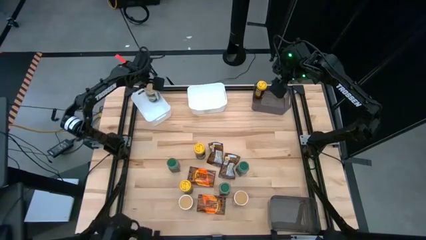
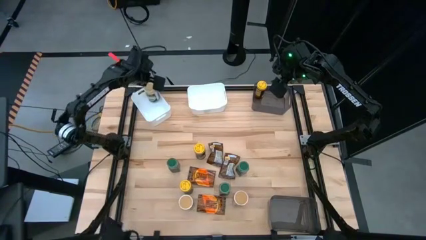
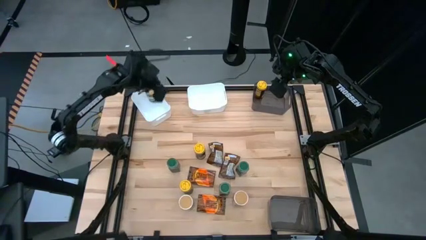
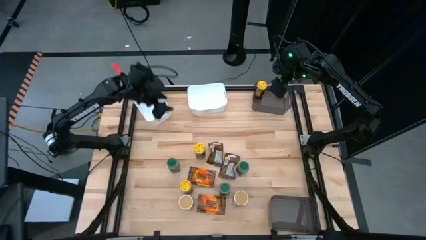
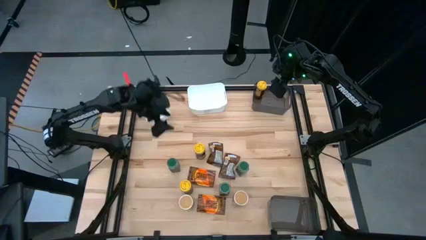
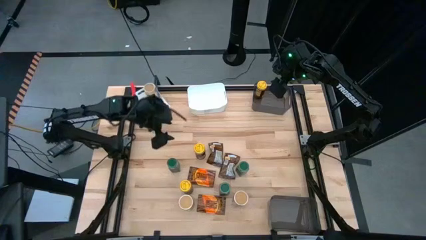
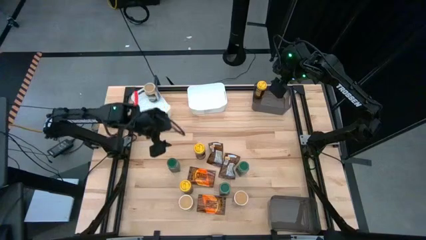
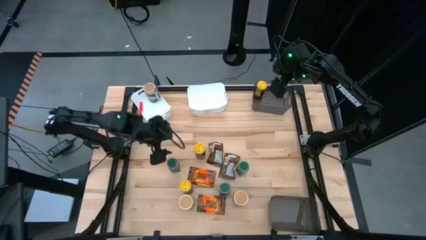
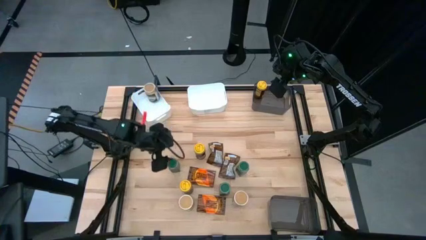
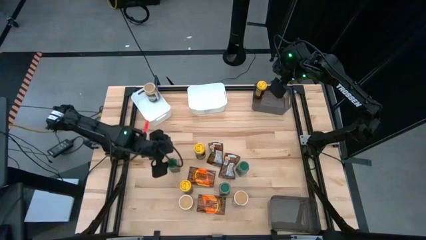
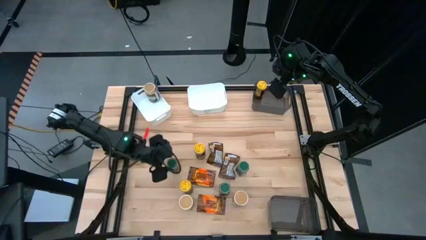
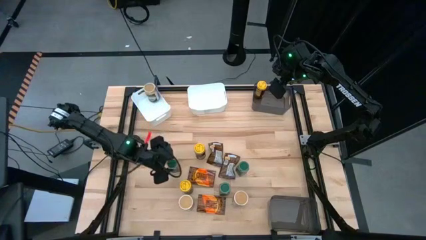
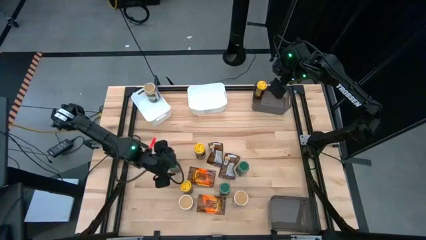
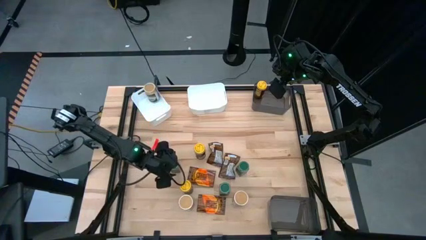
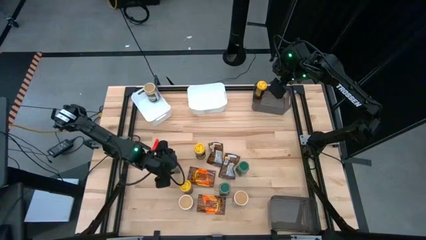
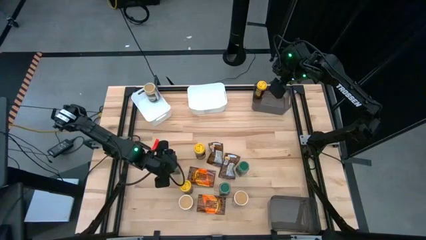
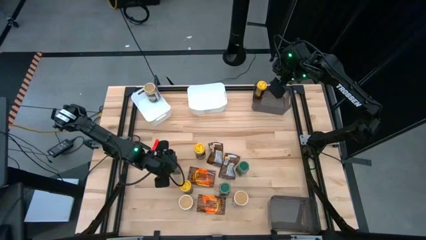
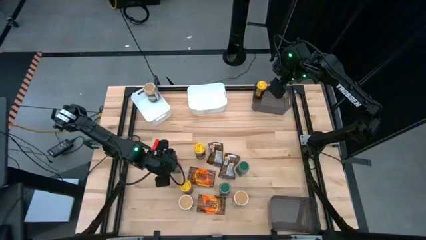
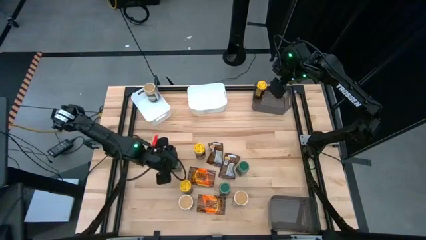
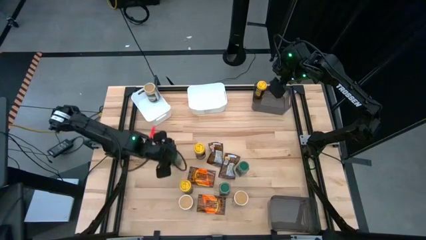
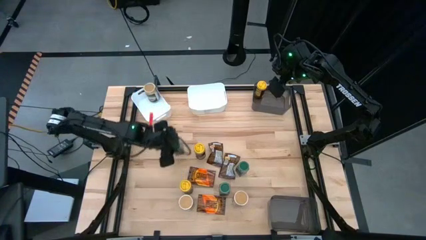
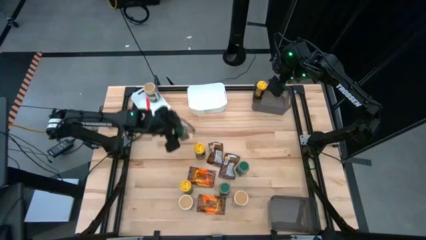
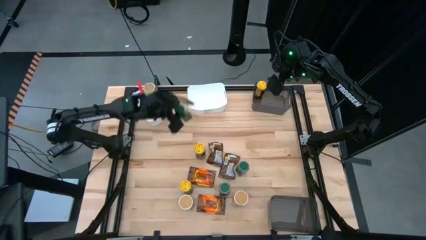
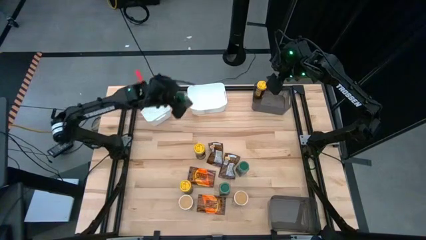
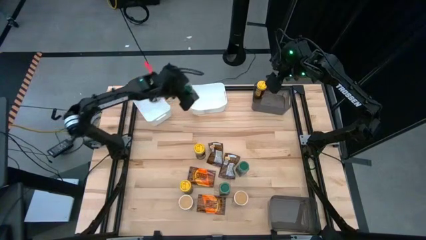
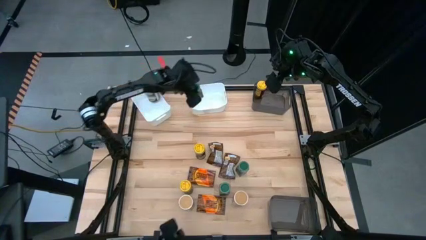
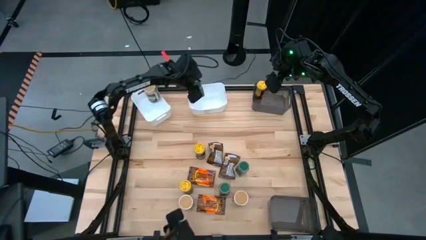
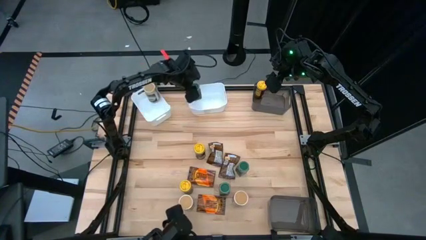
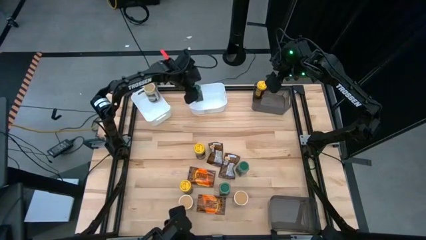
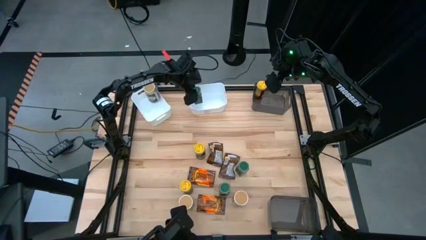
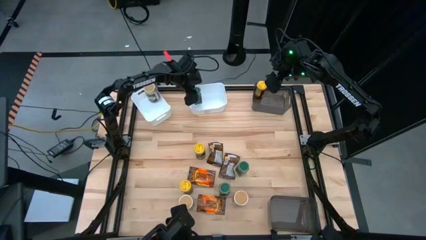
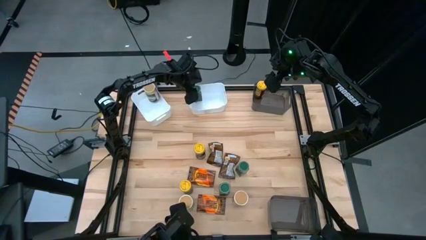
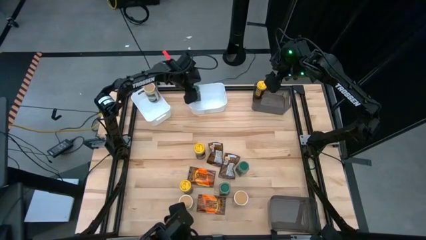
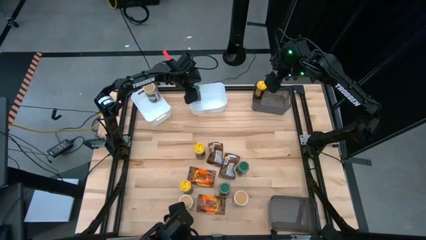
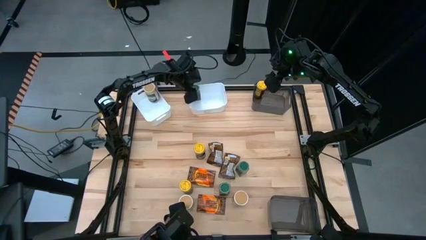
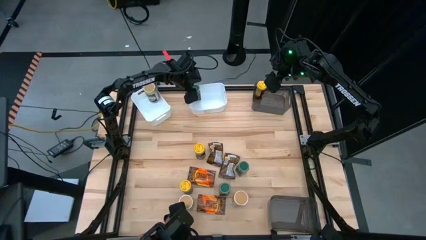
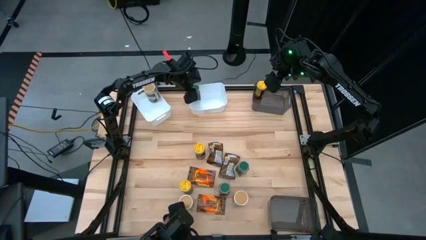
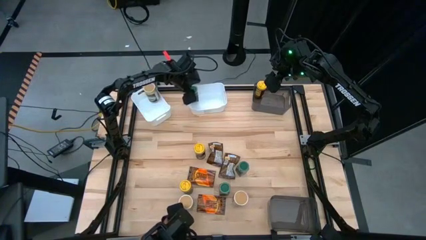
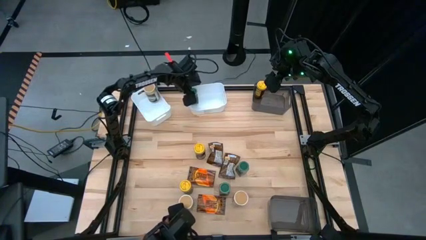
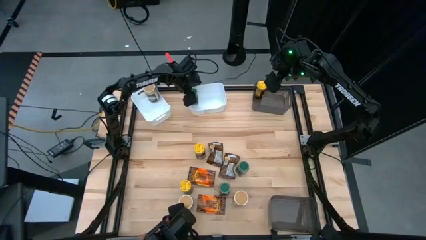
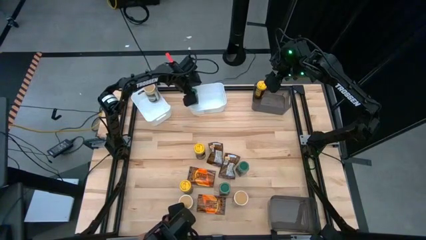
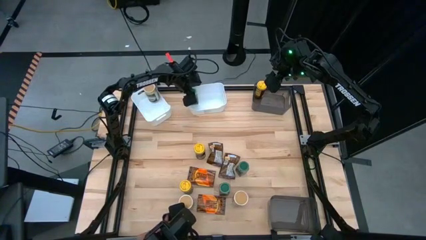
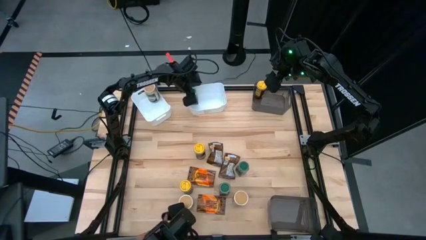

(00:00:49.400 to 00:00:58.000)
Task: Sort spices by type
Put the left green seasoning bottle into the right white bin

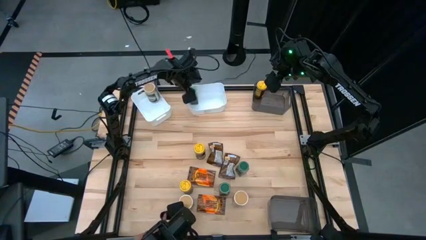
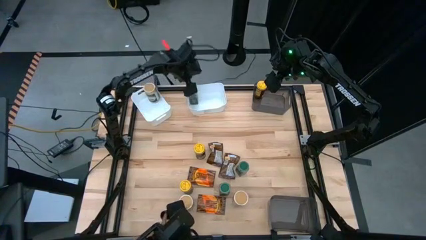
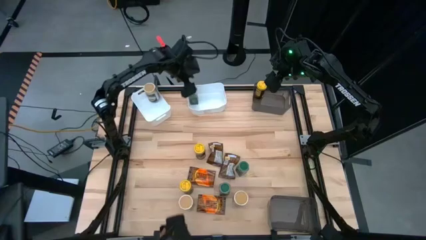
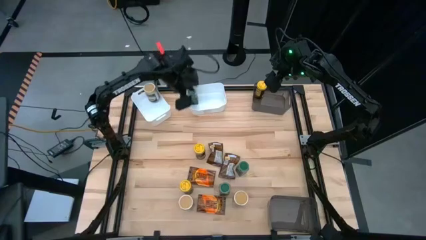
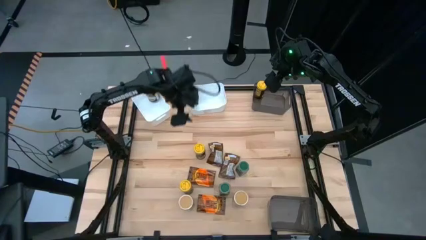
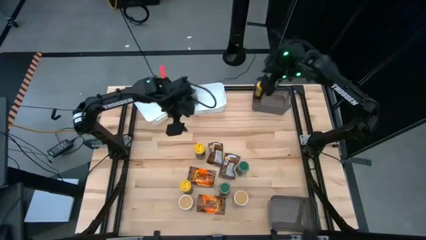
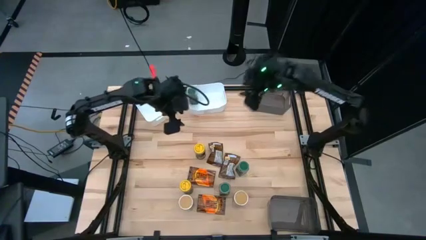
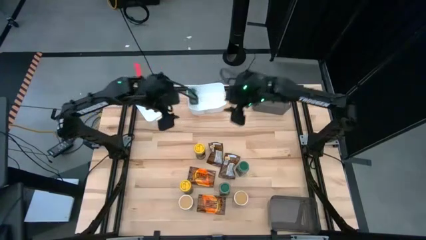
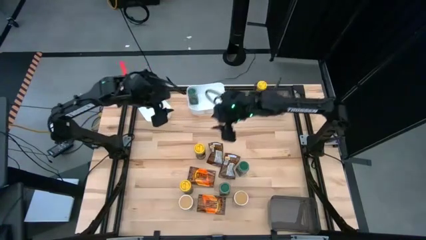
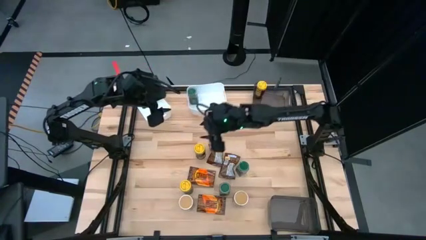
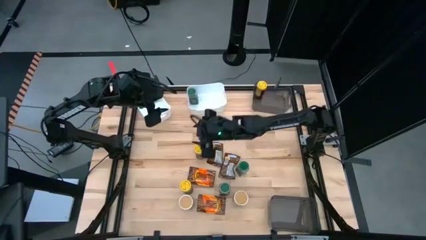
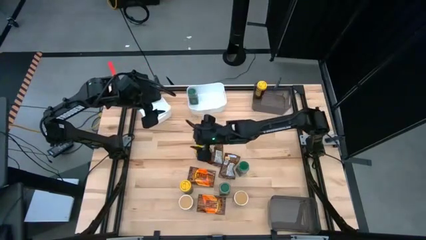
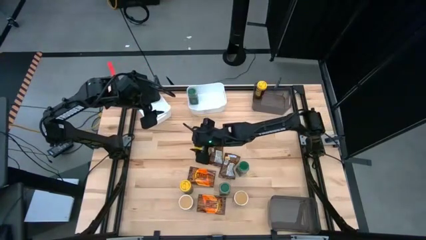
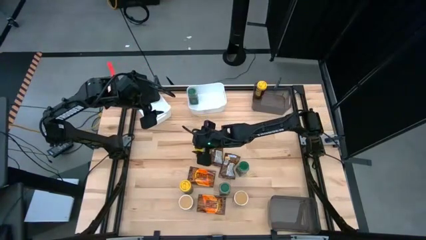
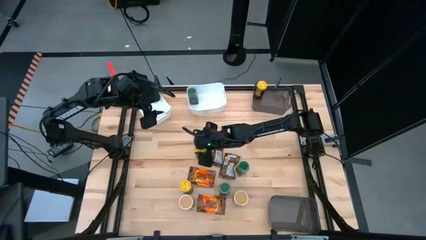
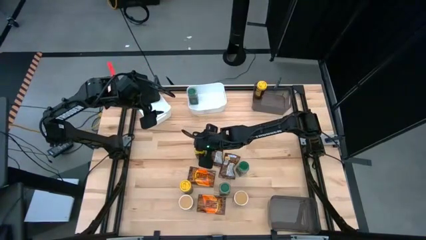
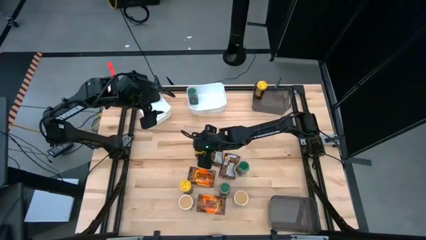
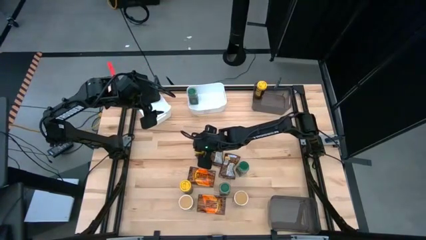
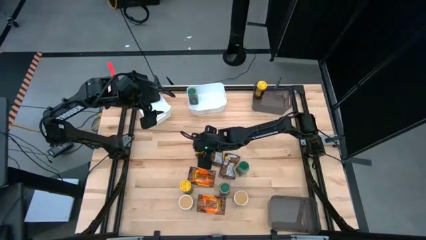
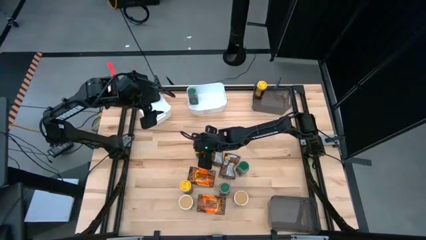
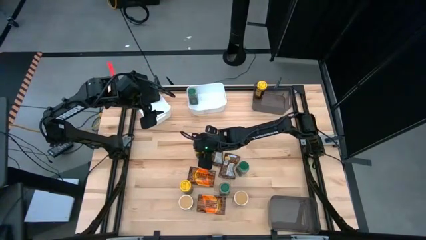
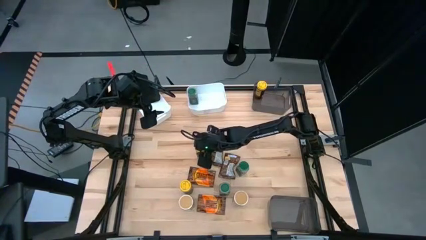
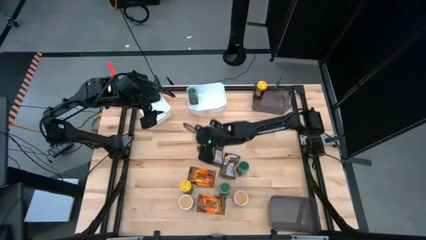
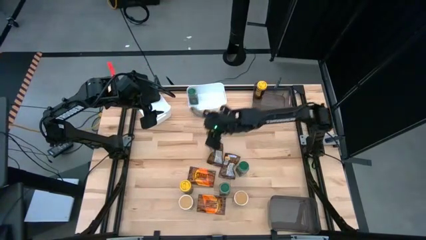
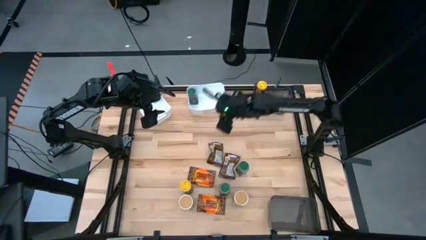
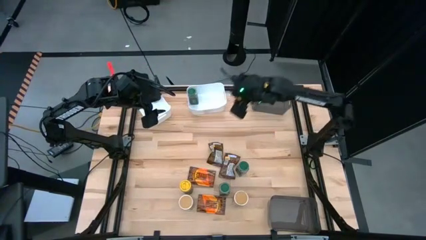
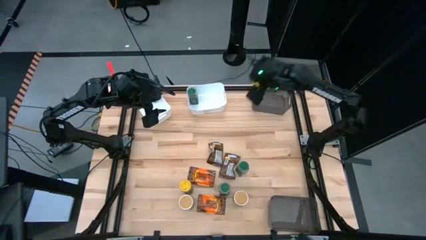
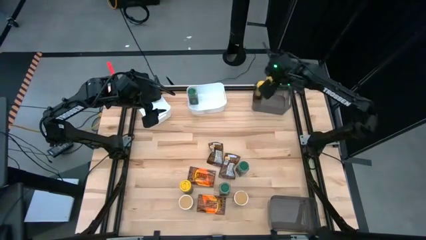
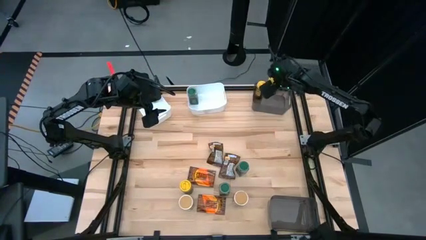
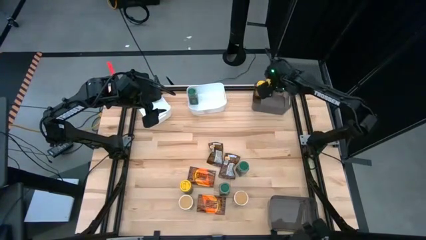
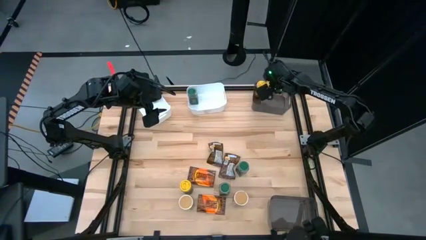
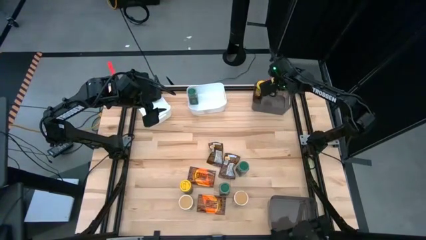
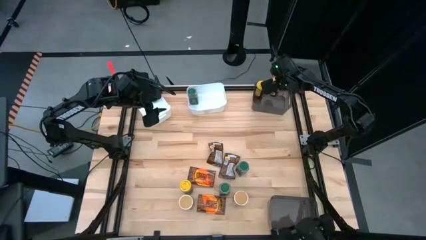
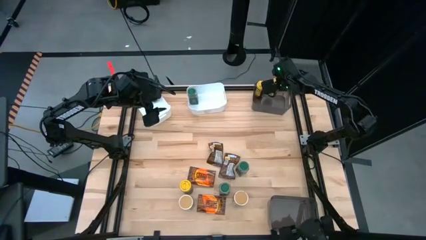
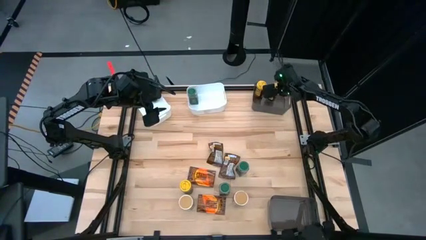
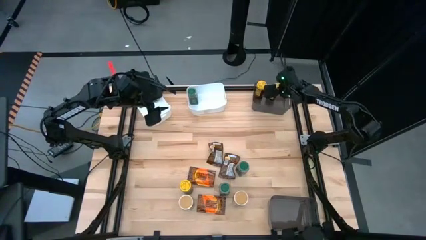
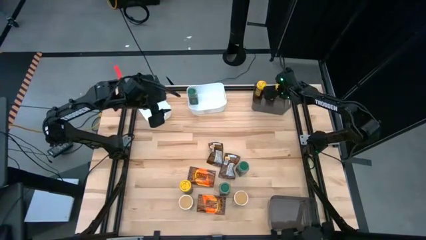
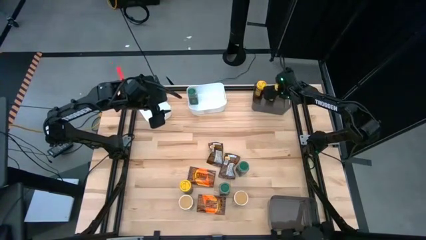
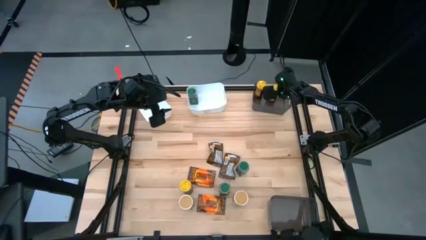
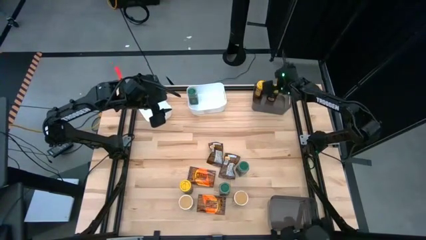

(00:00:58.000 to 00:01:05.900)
Put the top yellow seasoning bottle into the top black bin
